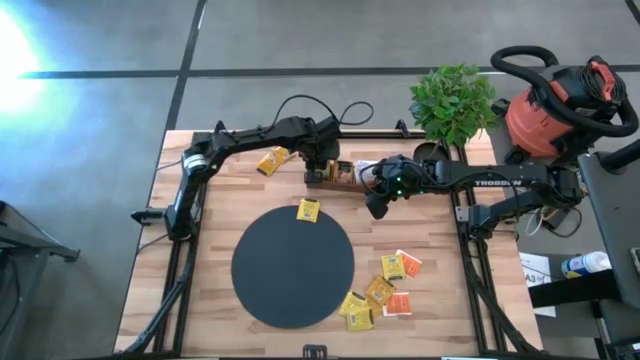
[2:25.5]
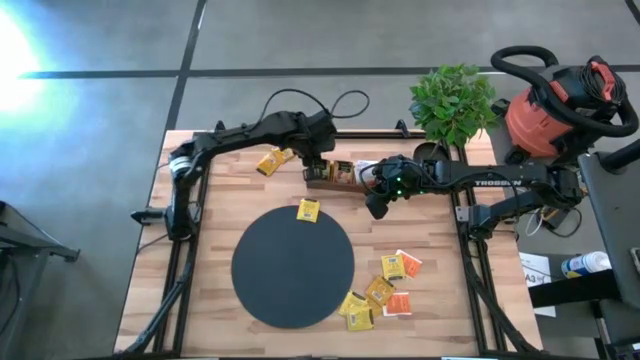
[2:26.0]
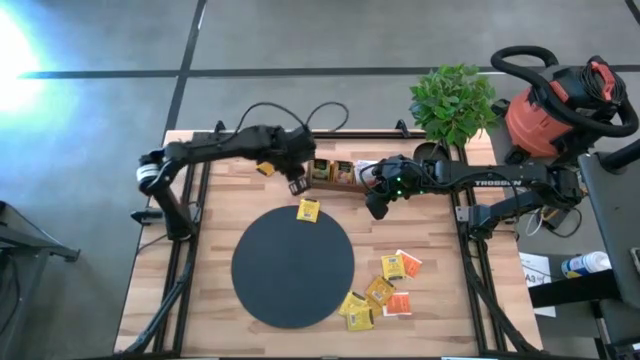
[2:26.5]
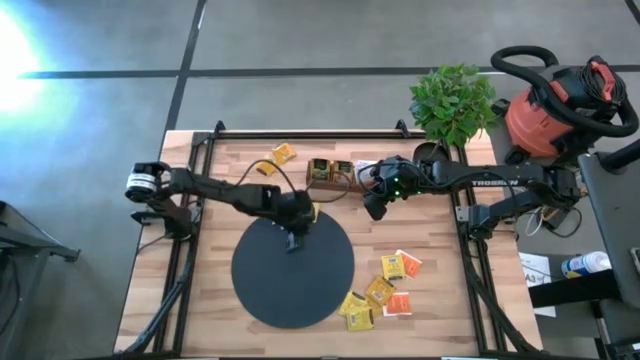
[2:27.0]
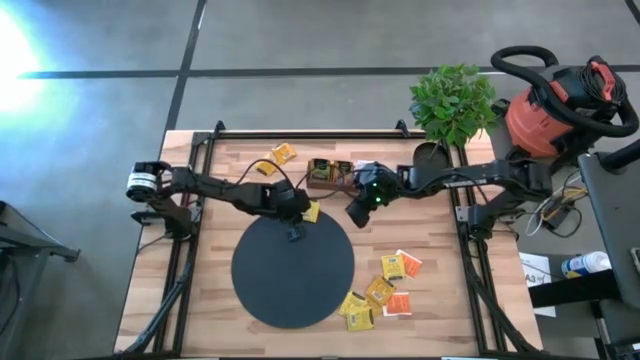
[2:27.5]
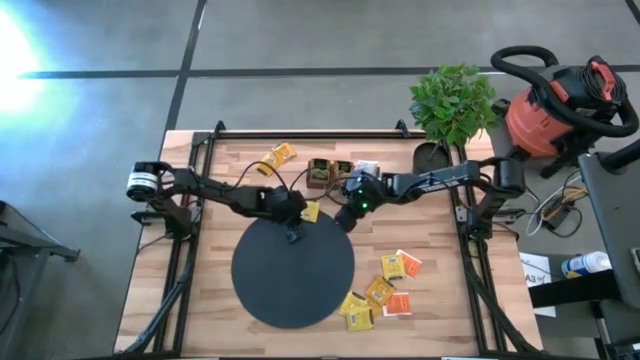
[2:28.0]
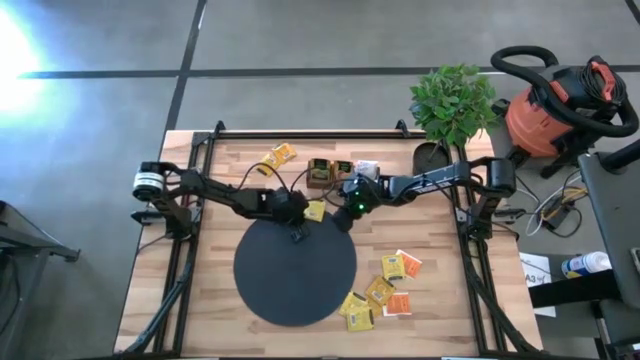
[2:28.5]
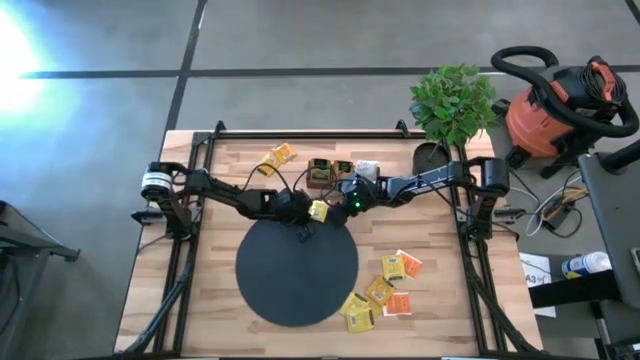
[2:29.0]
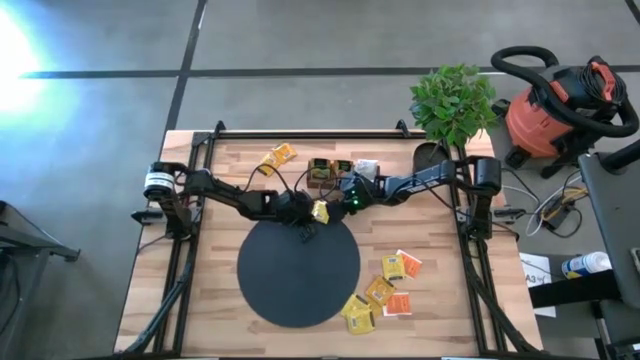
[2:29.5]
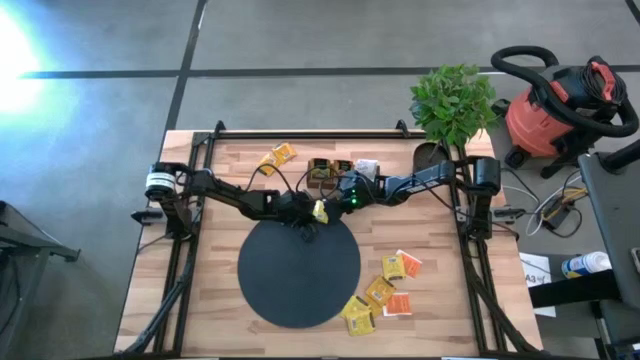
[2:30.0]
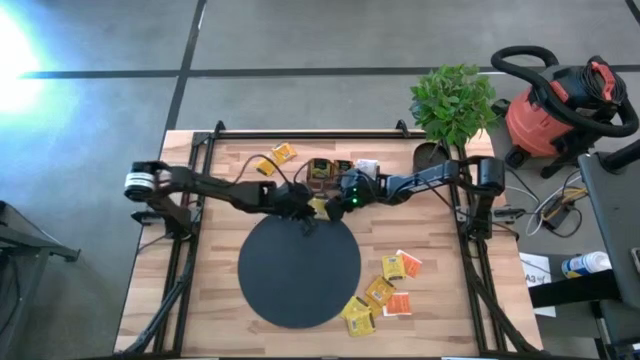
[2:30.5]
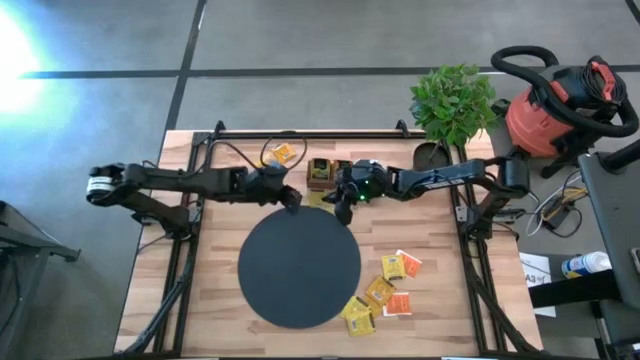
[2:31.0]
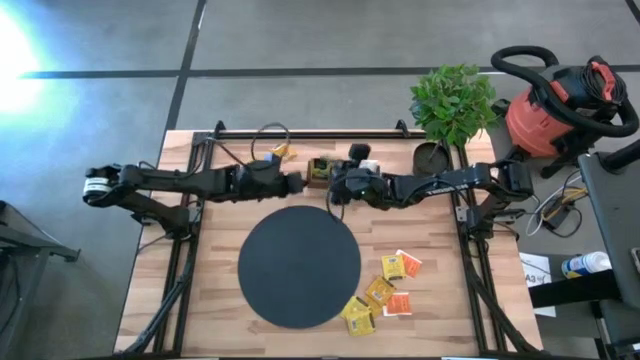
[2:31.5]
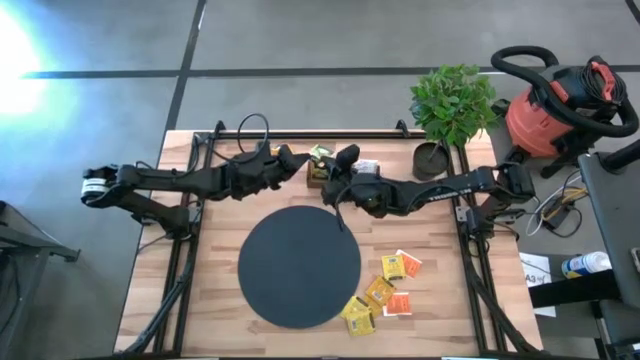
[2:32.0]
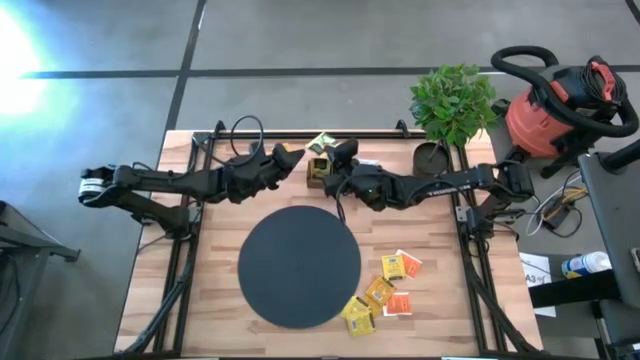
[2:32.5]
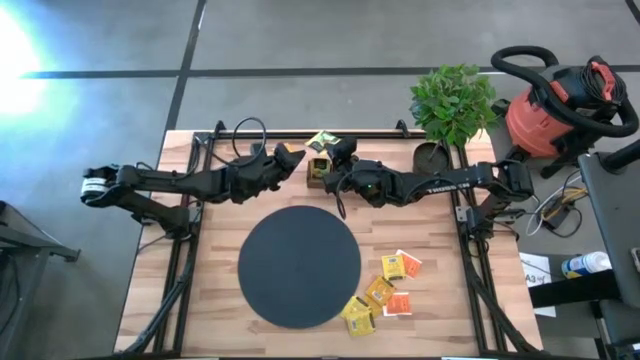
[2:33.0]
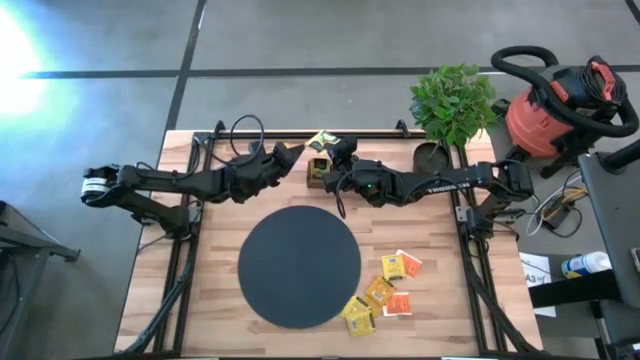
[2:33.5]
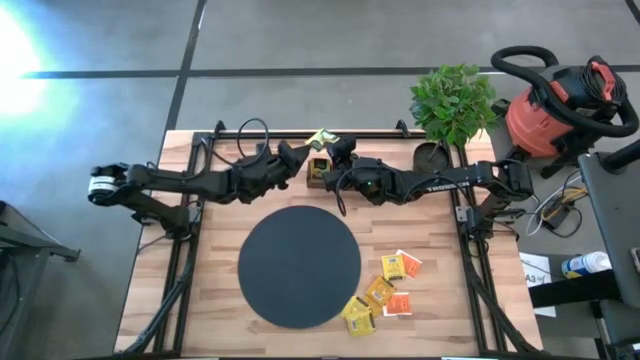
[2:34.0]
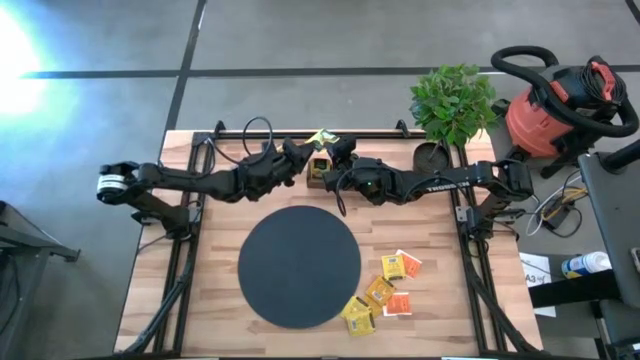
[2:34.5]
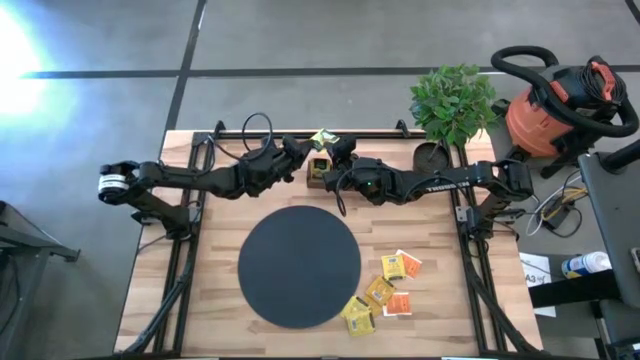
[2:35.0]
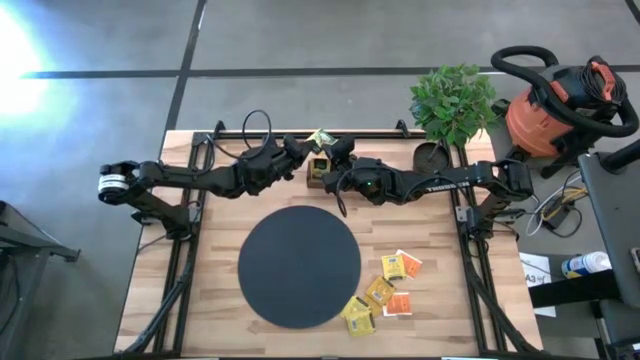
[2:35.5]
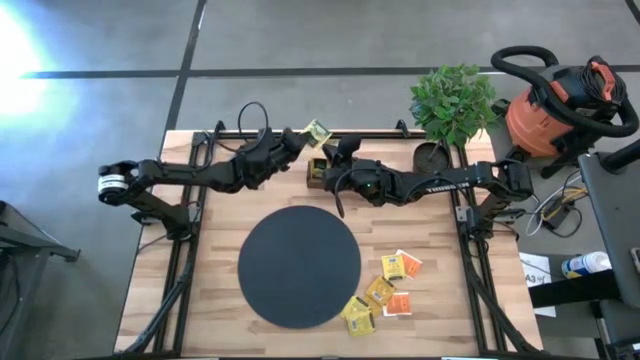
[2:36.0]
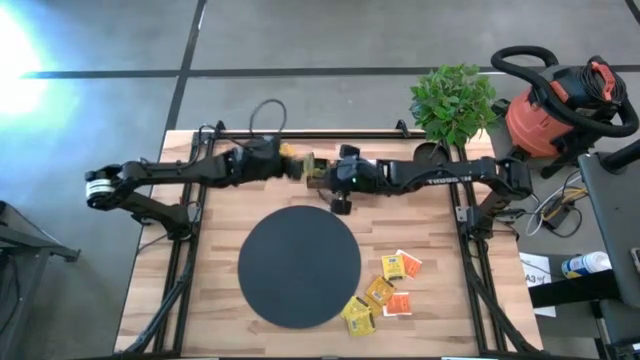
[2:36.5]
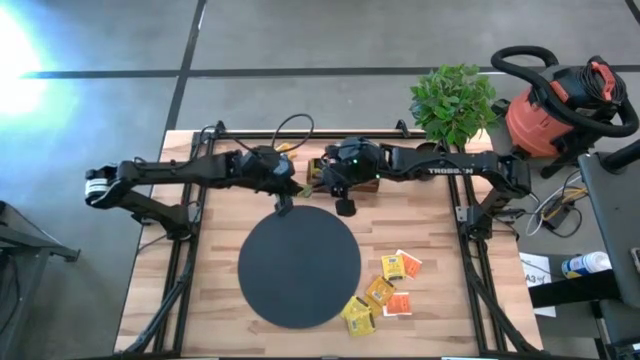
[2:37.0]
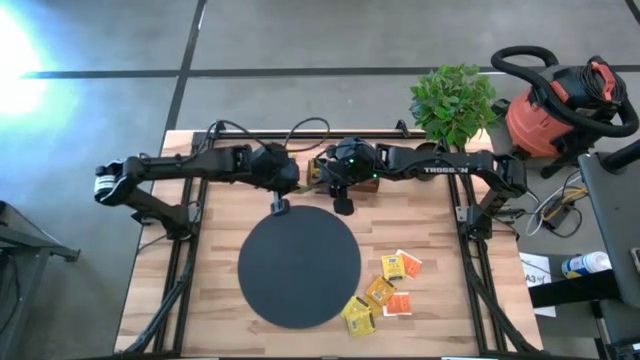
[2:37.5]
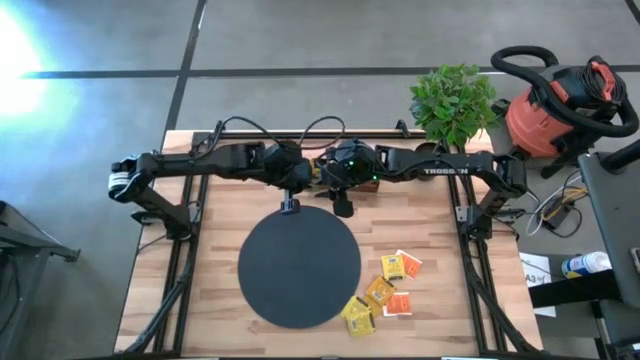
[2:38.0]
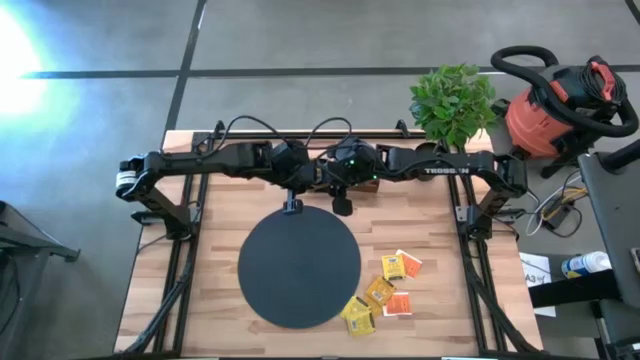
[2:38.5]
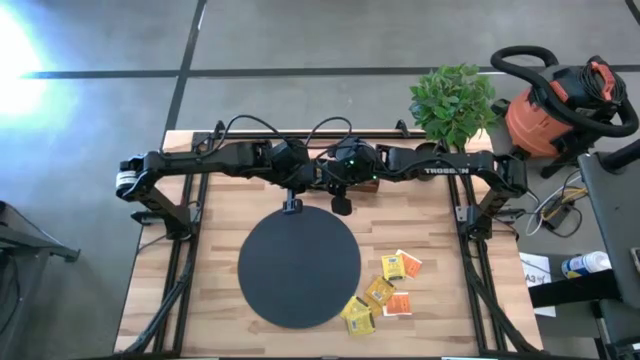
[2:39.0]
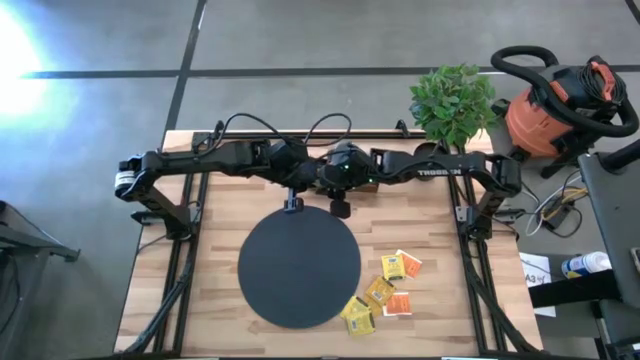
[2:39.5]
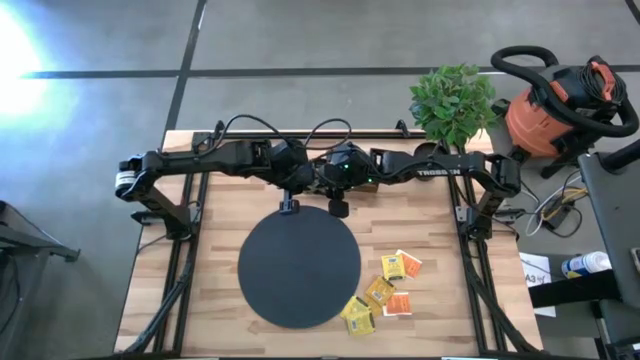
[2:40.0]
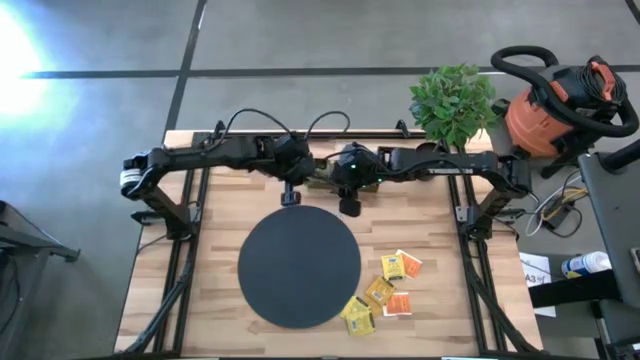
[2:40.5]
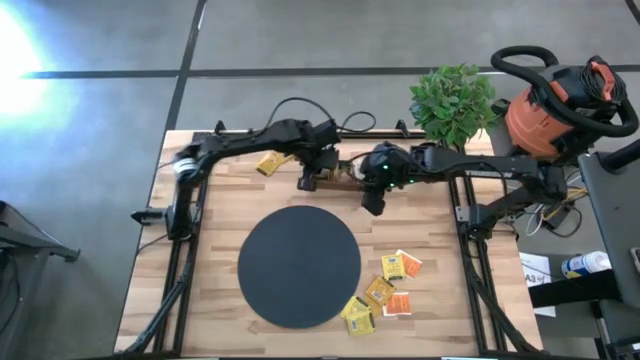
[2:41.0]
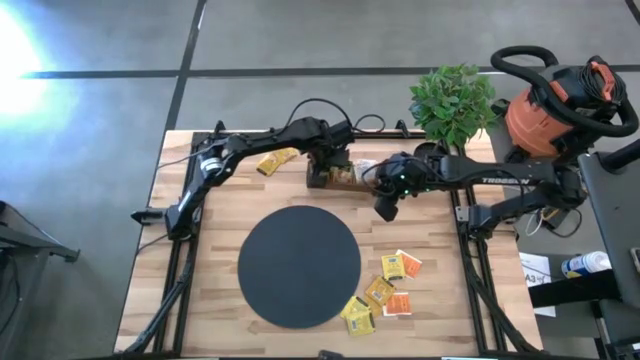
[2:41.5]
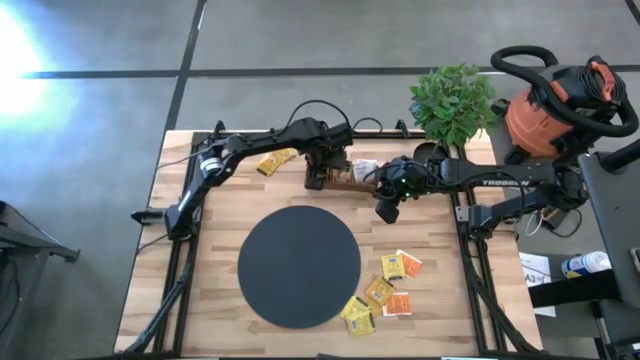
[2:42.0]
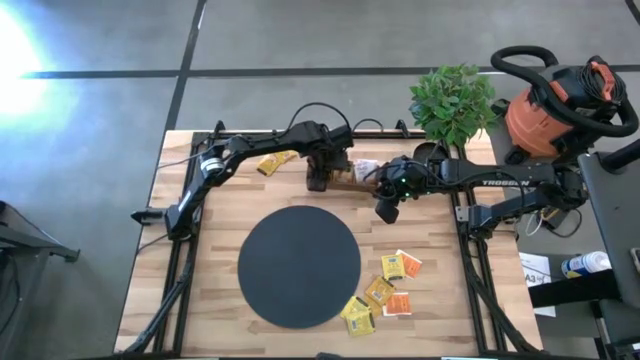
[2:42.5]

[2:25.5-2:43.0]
Task: Pick & Place Tea
Put the yellow tea bag into the left section of the wooden organizer
